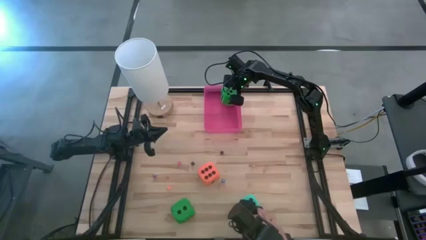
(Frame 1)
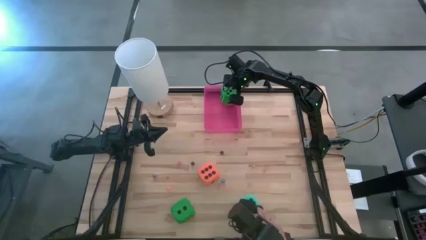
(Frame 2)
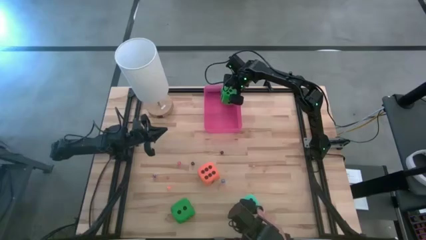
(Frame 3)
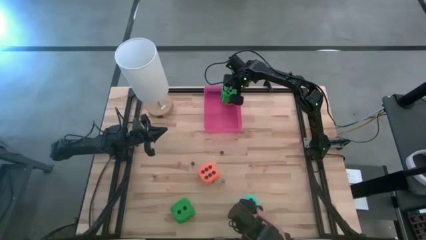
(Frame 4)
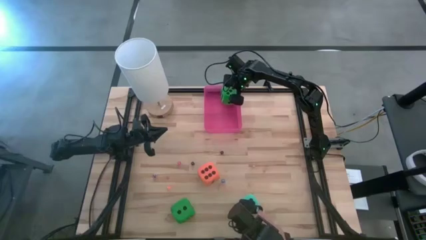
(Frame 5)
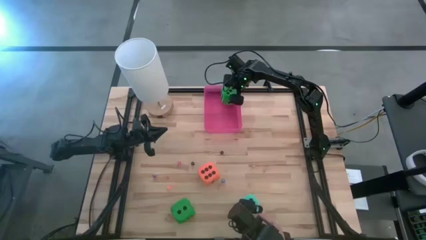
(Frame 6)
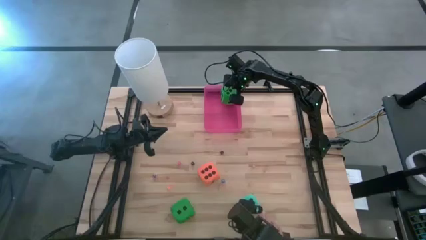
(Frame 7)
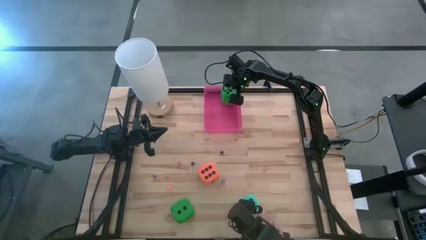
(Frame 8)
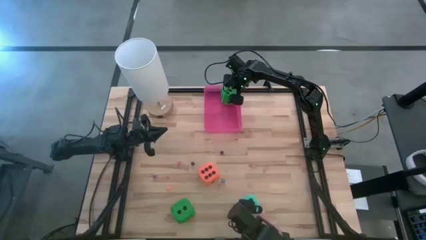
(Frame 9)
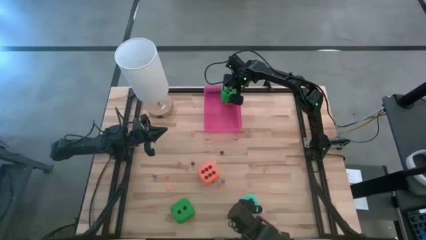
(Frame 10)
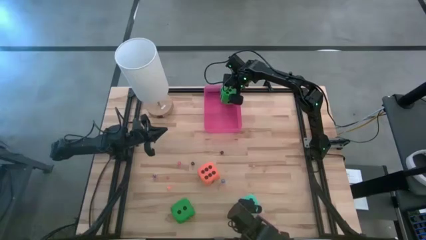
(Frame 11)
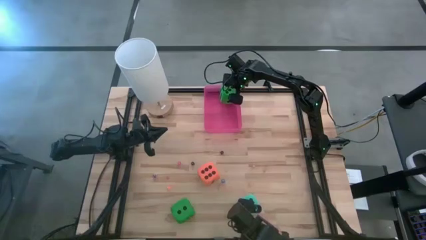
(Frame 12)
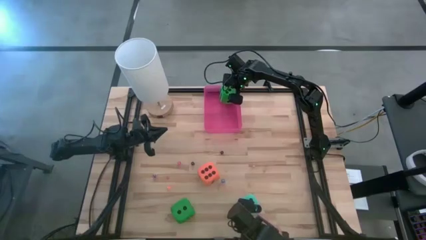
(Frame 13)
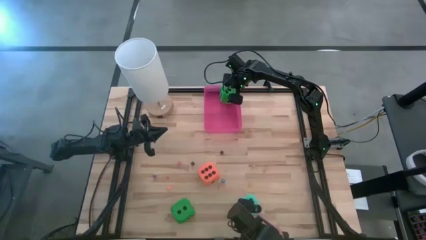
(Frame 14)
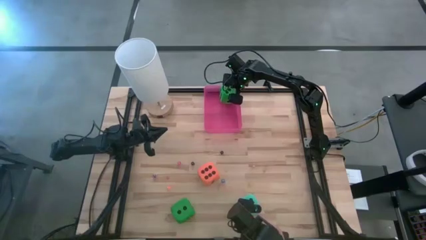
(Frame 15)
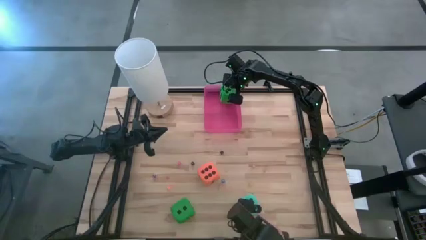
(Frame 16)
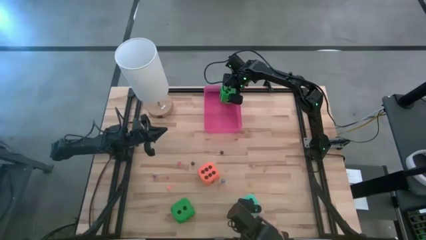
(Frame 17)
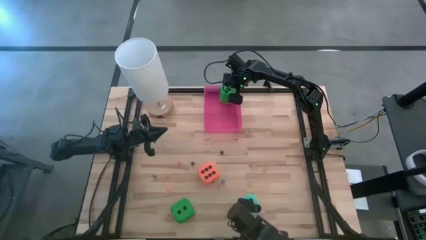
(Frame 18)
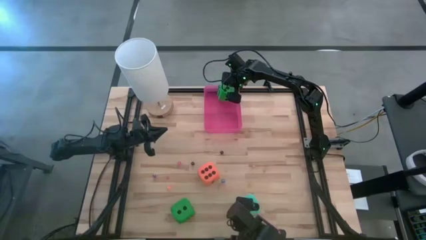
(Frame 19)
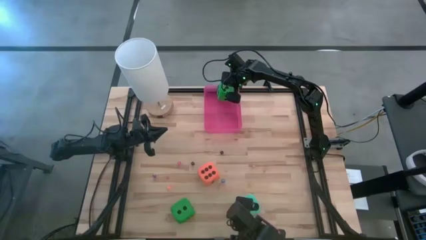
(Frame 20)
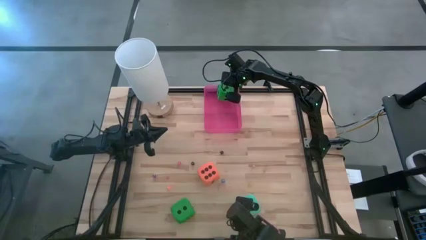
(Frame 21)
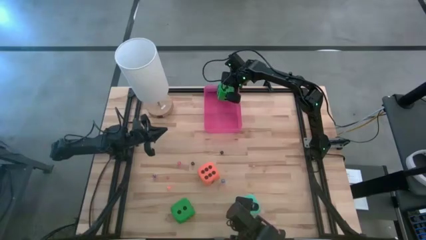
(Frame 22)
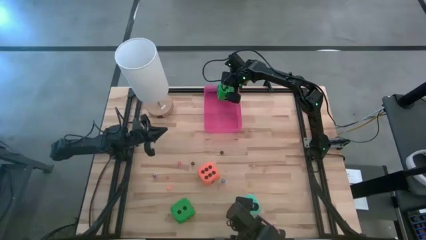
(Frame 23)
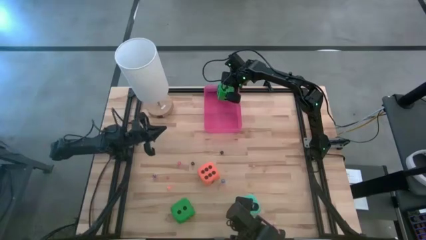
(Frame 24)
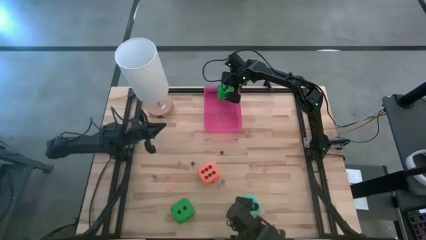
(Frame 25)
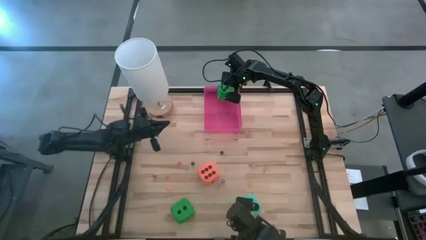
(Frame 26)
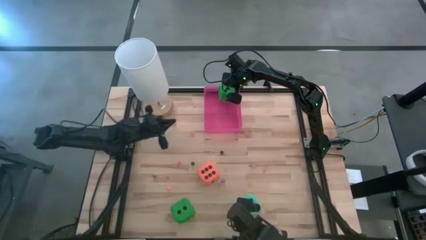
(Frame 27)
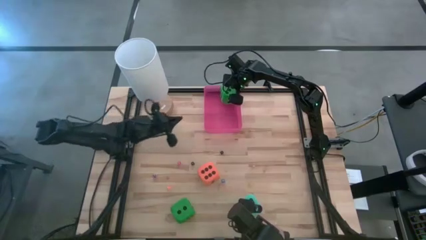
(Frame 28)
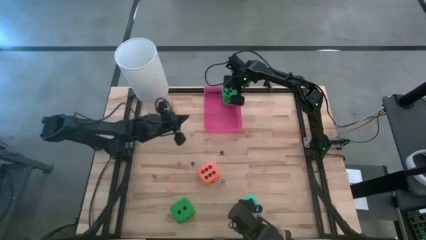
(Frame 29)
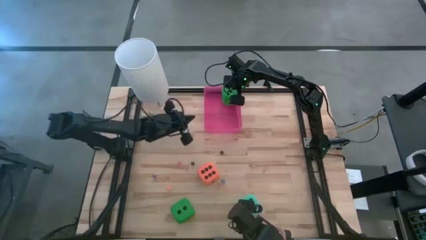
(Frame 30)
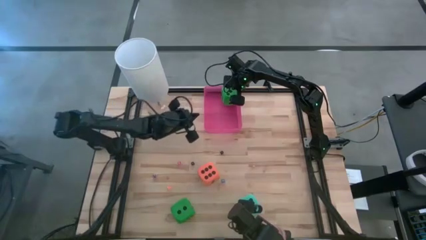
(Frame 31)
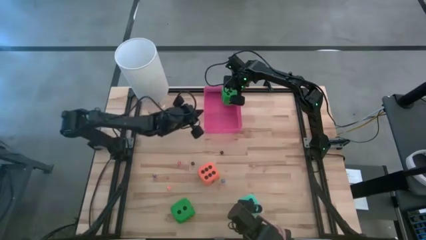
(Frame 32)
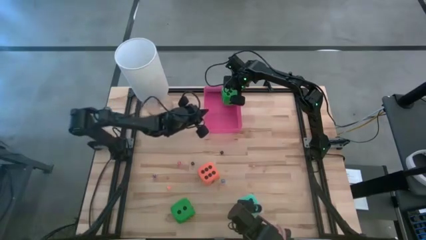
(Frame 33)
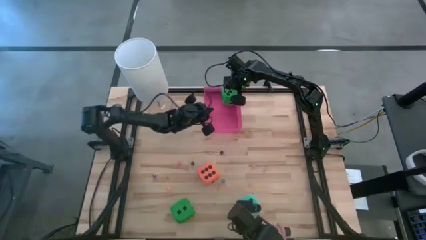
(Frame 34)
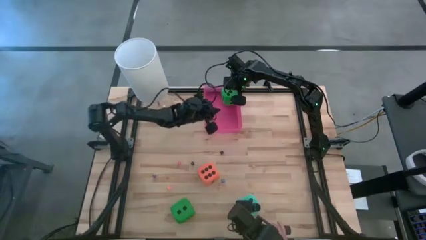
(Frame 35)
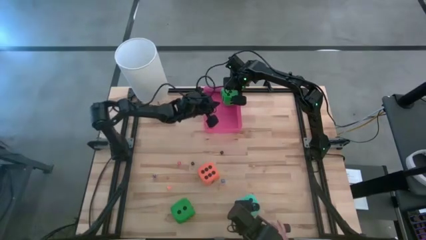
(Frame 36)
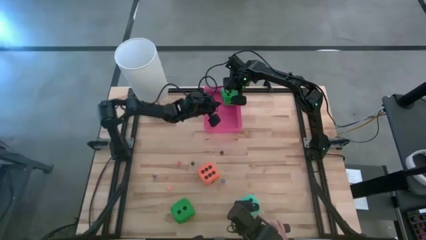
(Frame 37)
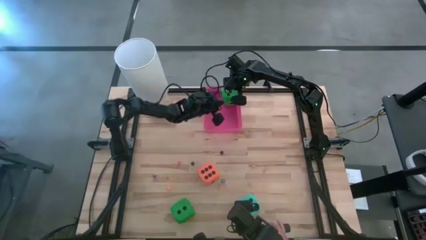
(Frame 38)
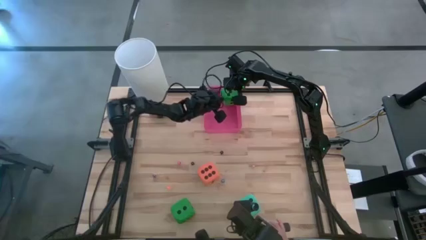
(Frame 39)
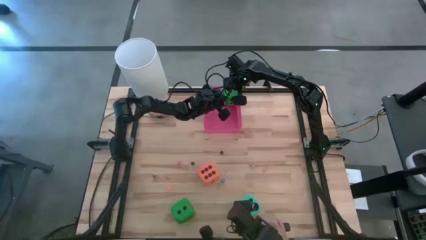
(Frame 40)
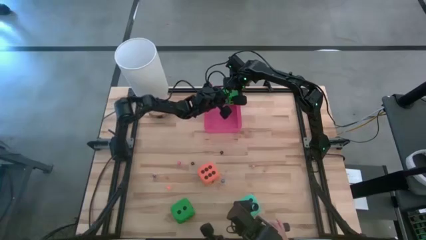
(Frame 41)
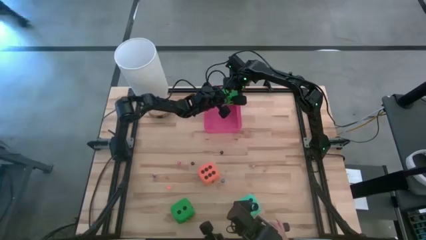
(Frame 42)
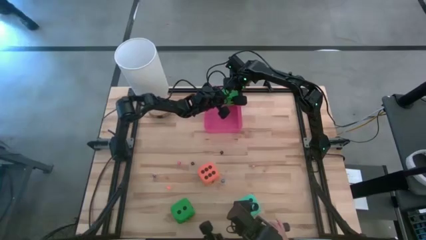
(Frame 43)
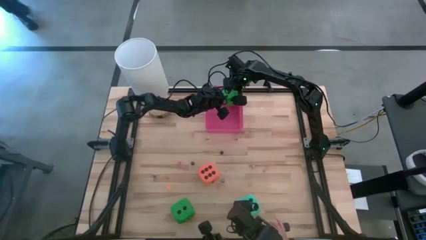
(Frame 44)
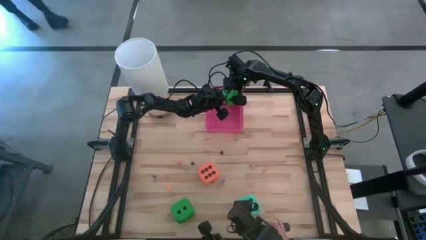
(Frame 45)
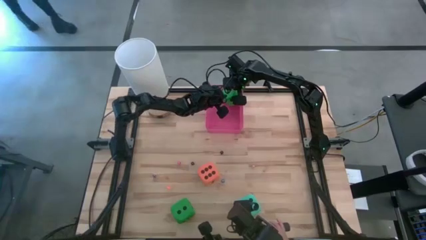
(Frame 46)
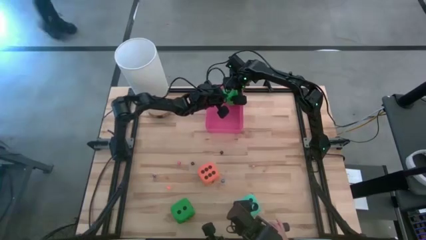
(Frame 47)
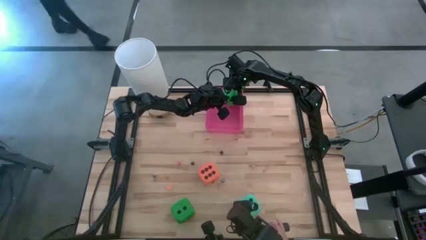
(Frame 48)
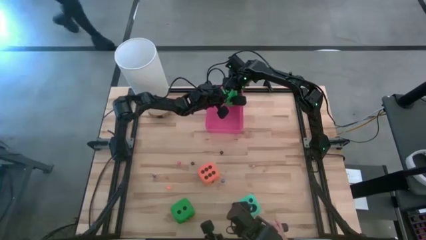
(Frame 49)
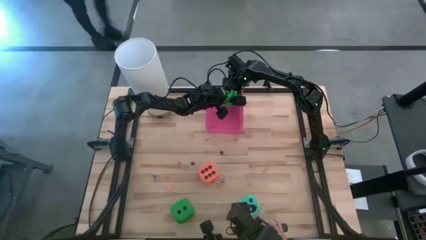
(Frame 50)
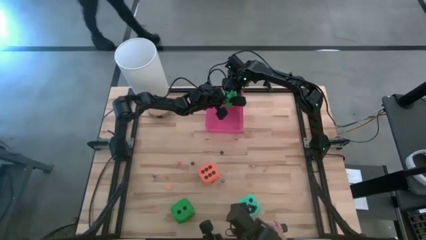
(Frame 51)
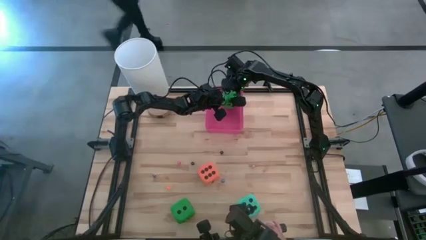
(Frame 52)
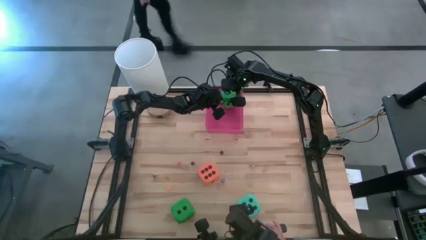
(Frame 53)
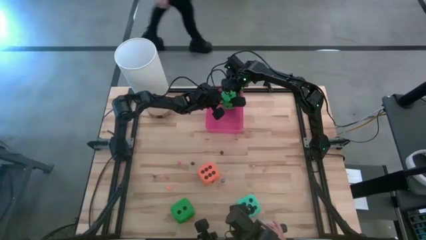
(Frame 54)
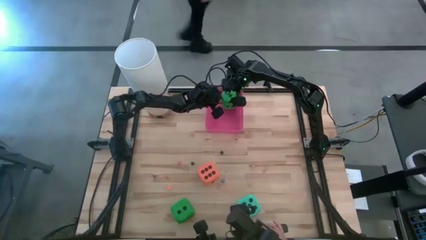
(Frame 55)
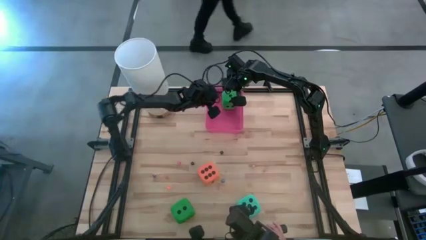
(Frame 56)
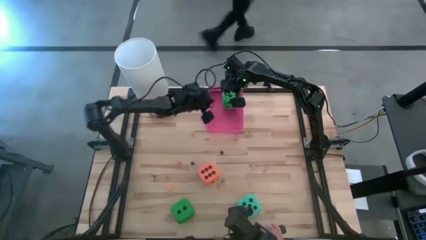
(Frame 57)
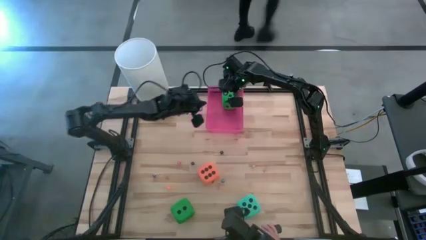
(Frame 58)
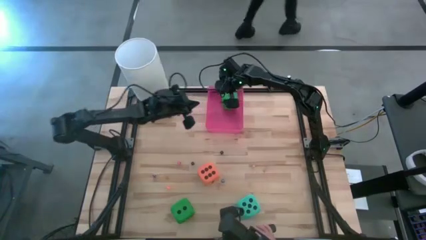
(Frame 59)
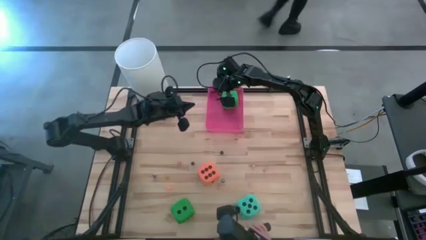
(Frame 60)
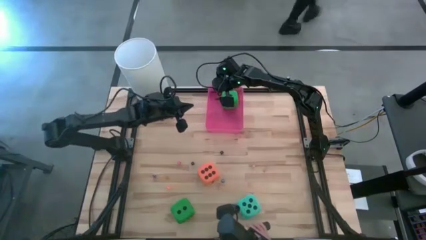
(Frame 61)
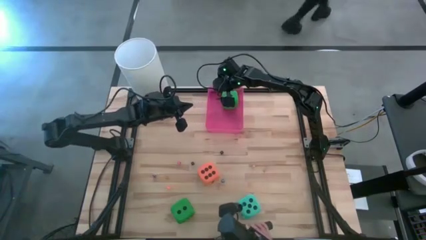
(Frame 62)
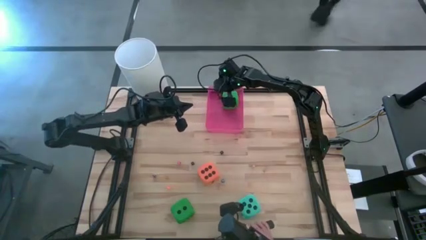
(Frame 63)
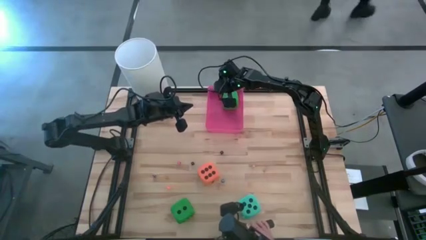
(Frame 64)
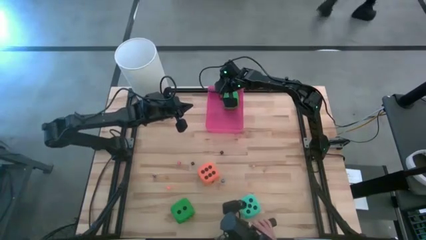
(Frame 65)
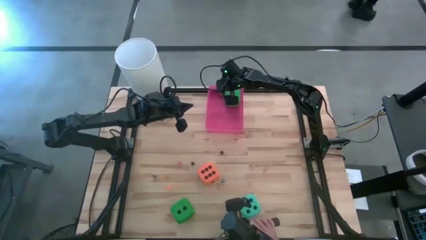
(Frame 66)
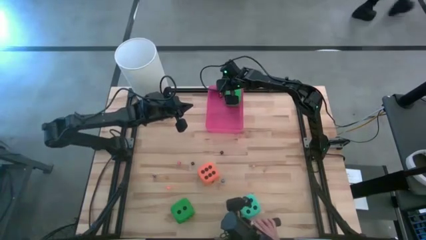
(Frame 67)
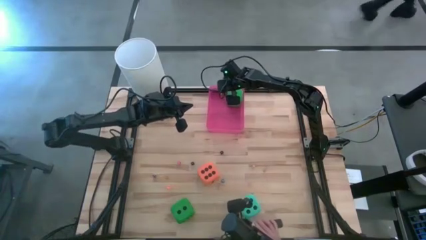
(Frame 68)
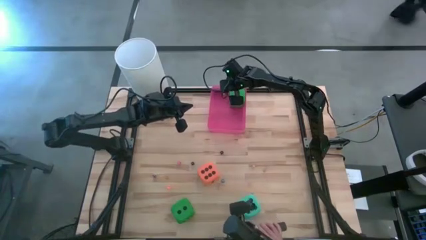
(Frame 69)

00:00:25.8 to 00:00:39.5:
Task: Pick & Place Dice
Put the right big green dice into the red container
